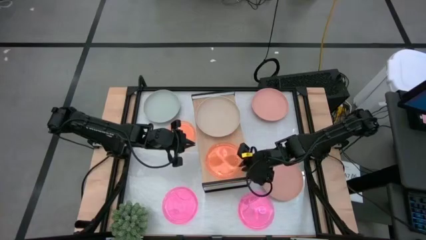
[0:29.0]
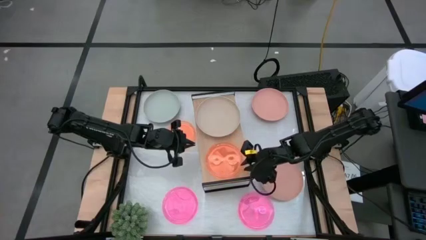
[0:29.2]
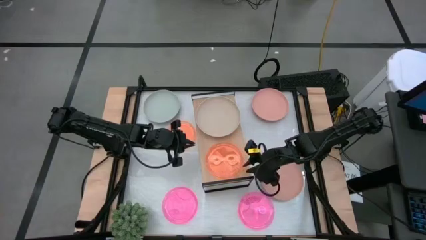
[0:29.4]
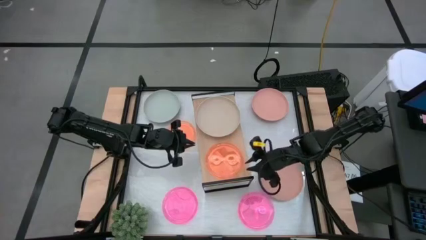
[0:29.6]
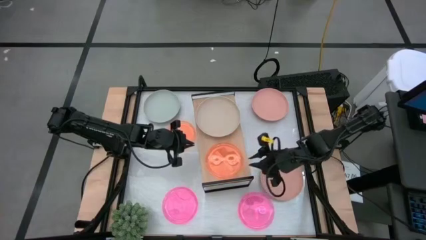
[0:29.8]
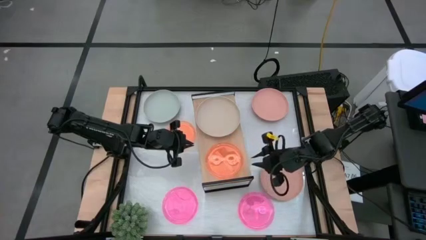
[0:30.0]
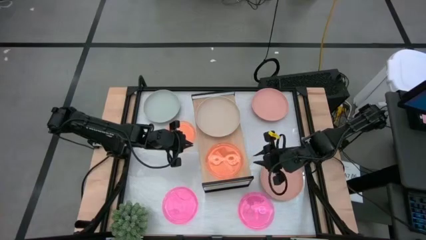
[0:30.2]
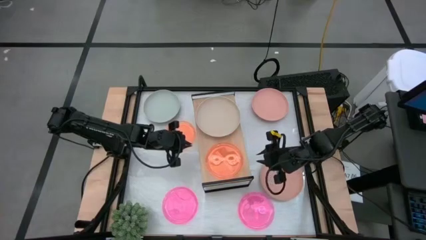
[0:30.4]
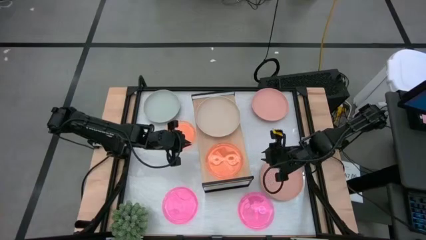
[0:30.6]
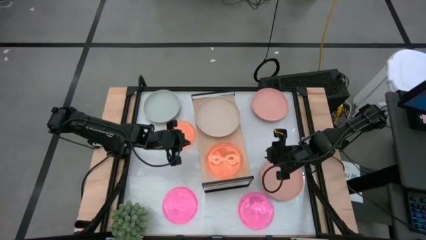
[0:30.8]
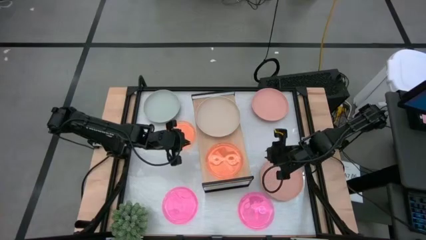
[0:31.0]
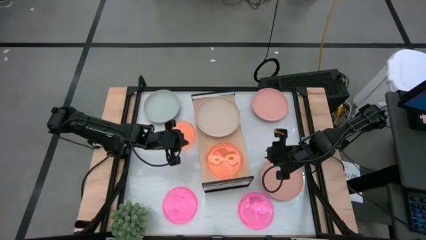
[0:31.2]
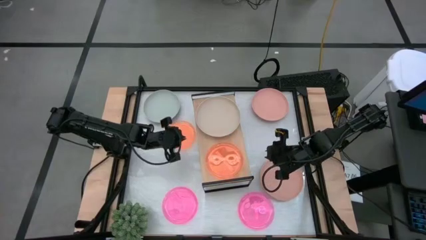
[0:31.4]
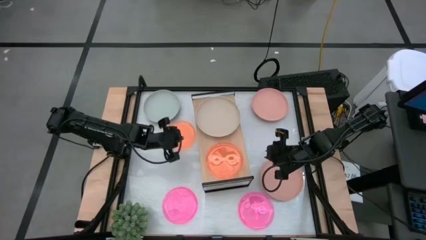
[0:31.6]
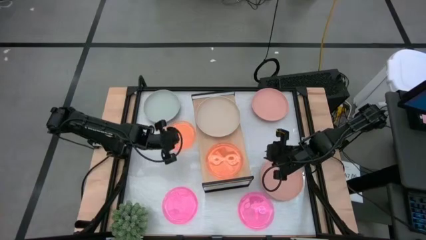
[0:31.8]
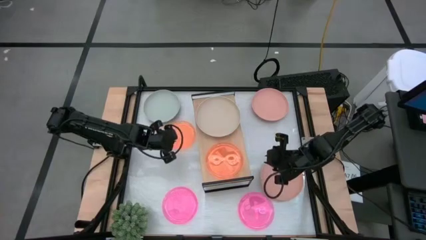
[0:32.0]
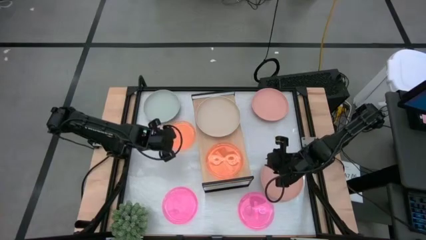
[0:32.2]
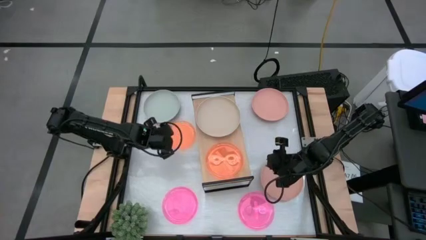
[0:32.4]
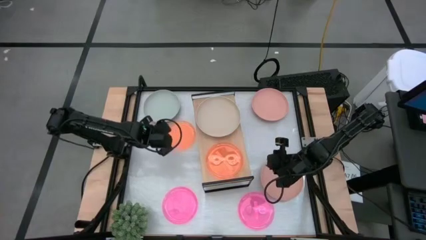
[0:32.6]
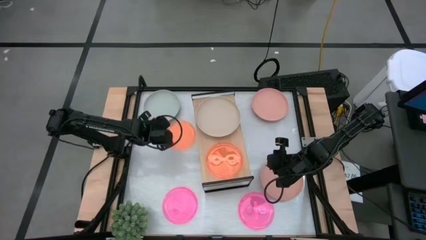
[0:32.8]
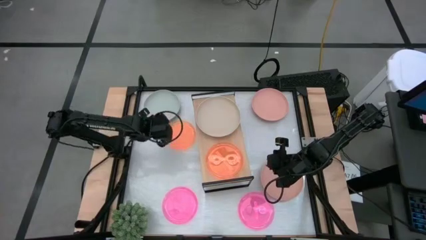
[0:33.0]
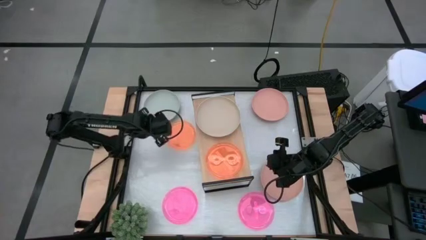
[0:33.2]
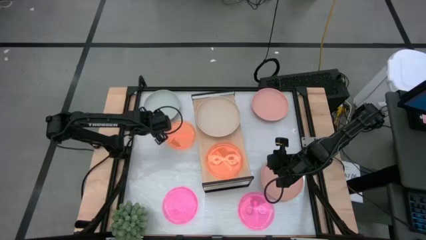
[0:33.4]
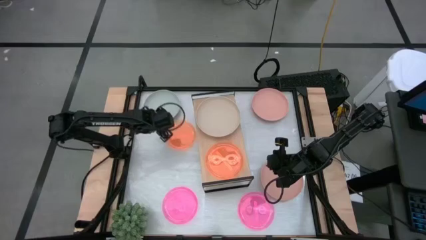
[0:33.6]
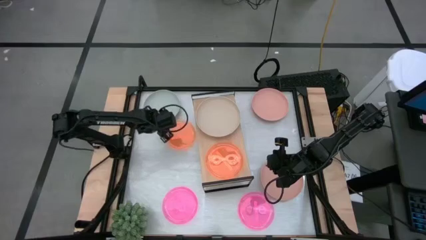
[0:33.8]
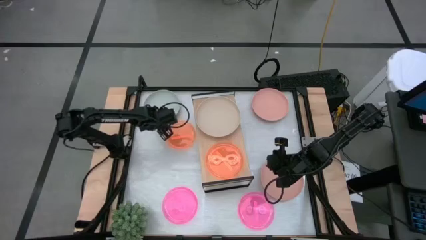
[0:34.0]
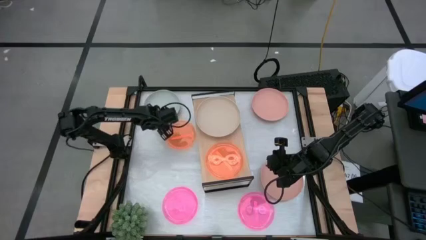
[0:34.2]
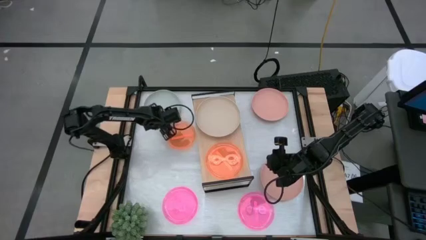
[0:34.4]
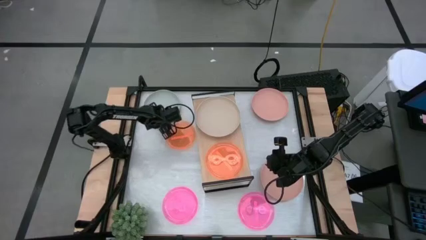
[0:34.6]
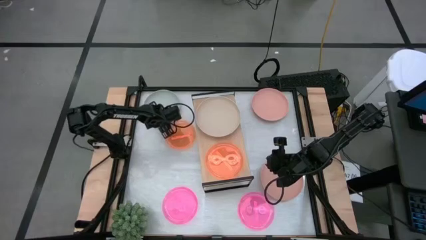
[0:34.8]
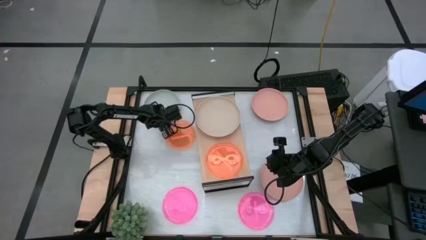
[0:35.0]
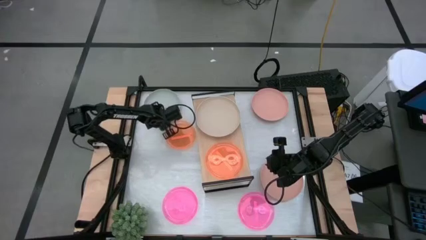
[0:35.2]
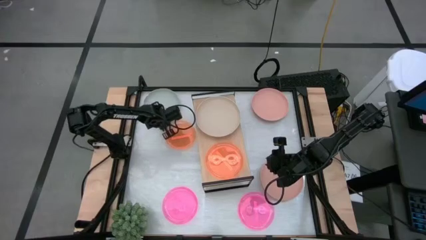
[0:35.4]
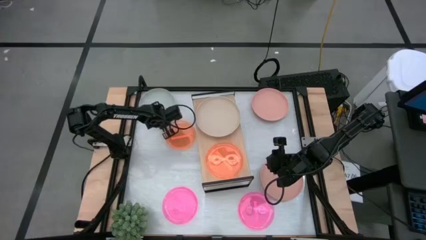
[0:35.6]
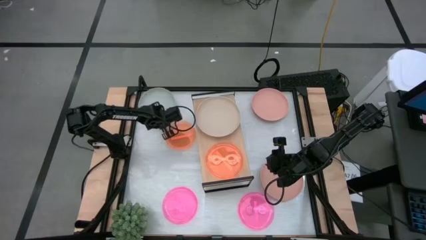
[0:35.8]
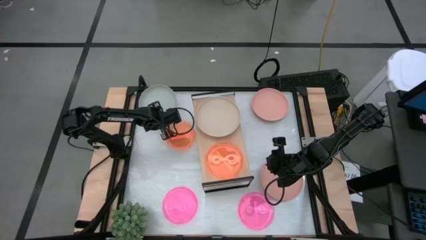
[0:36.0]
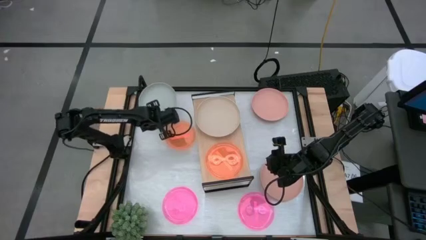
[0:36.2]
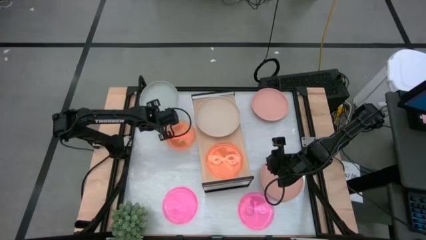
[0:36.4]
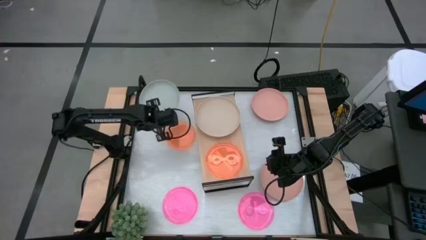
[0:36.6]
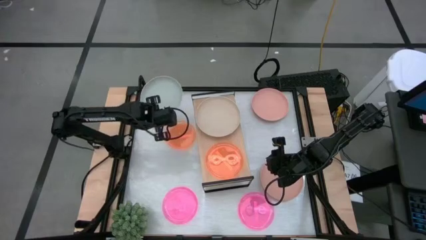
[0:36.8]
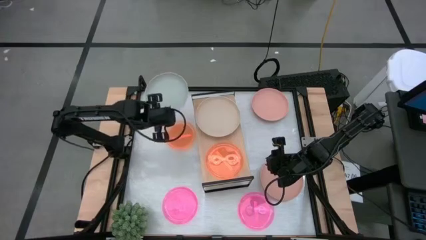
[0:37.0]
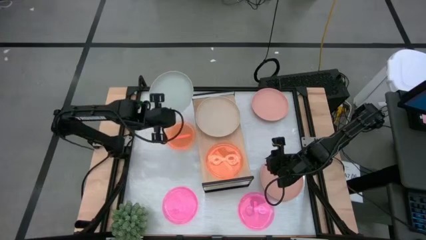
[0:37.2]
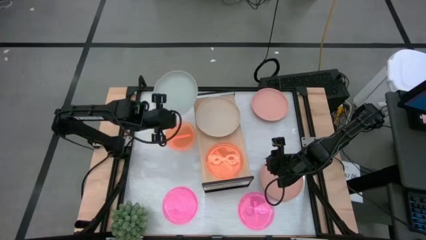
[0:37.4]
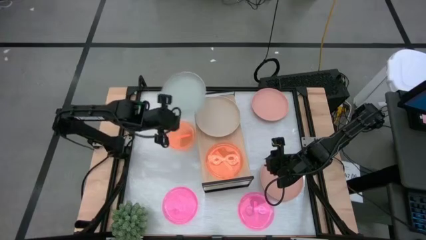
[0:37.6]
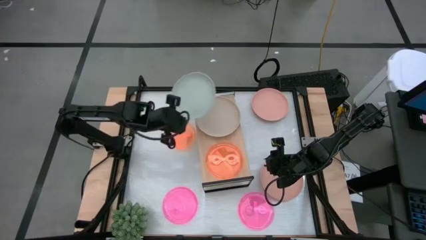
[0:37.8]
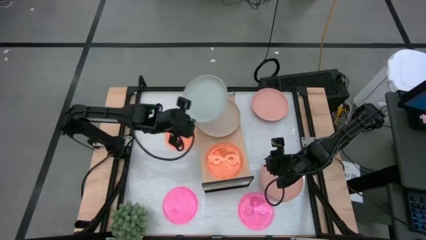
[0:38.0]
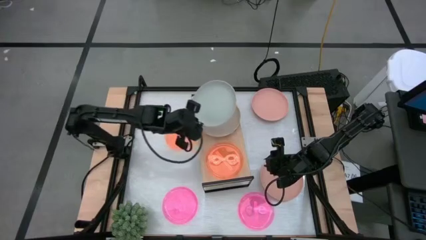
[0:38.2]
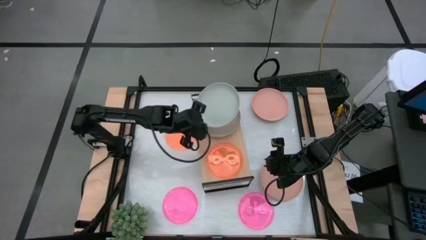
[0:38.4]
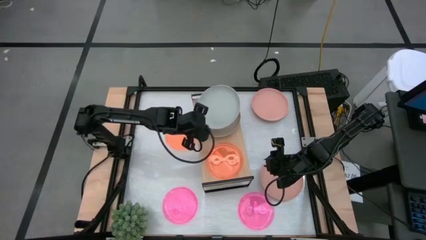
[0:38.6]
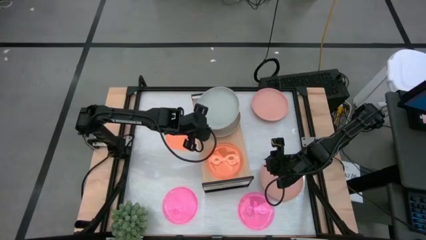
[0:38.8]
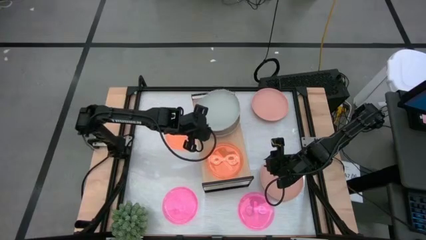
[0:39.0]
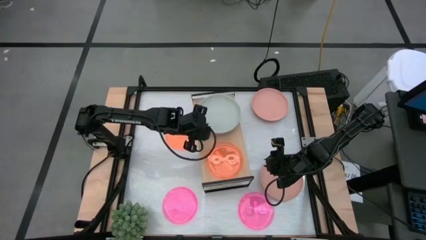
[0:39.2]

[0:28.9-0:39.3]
Task: Place and stack plates onto a shelf
Stack the gray plate on the brown plate on the shelf

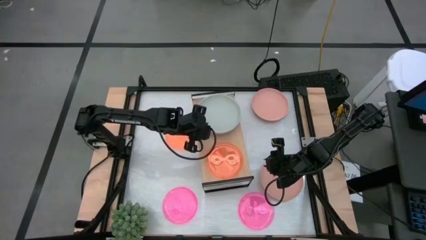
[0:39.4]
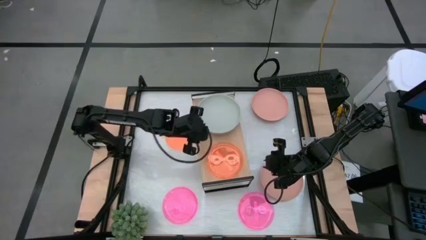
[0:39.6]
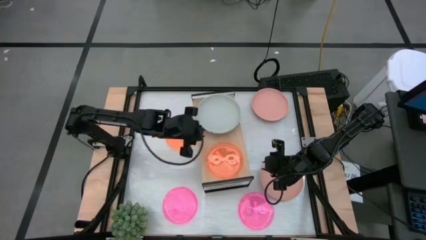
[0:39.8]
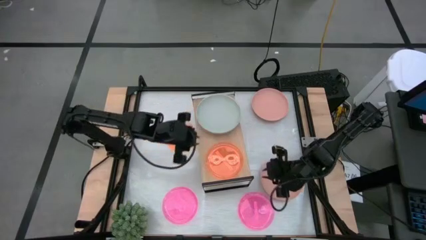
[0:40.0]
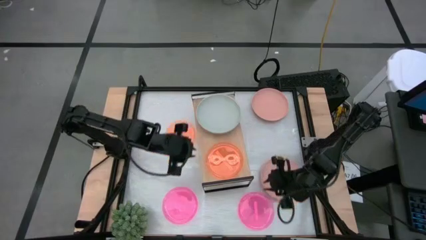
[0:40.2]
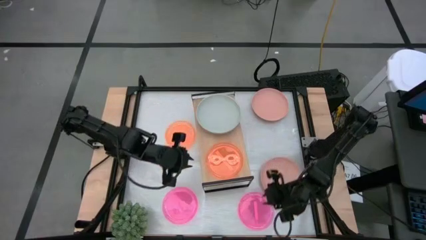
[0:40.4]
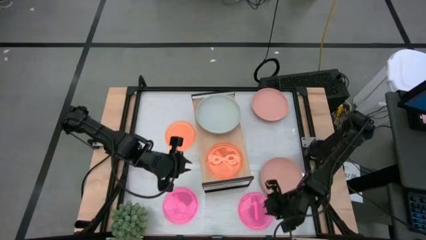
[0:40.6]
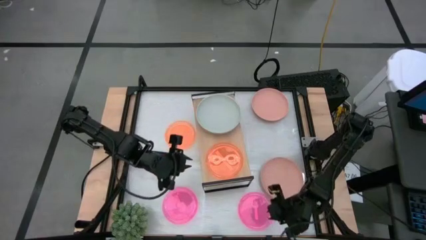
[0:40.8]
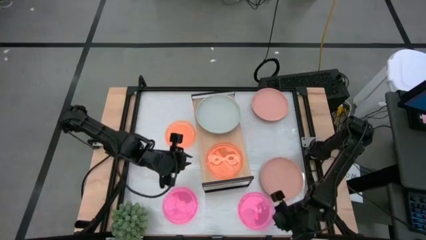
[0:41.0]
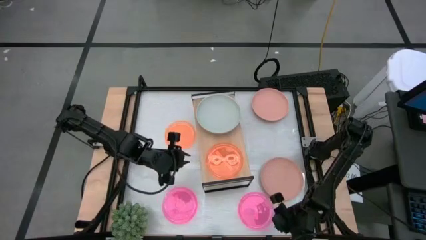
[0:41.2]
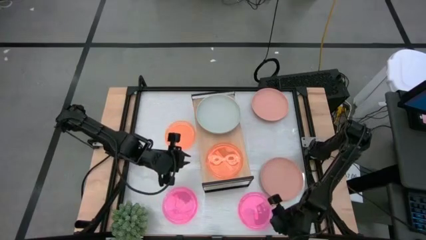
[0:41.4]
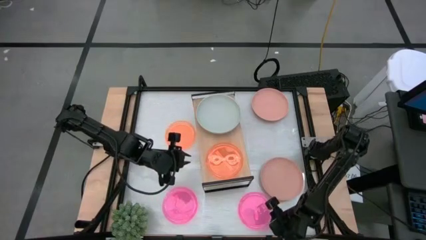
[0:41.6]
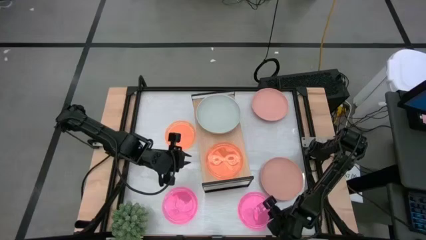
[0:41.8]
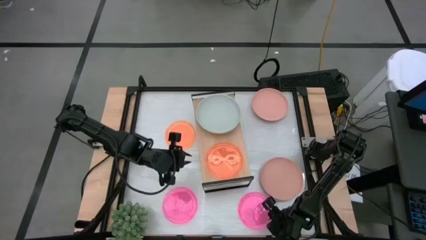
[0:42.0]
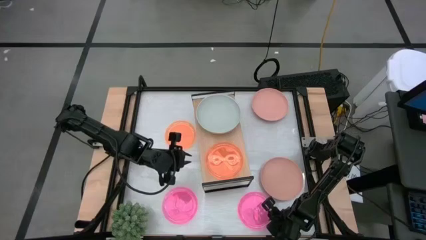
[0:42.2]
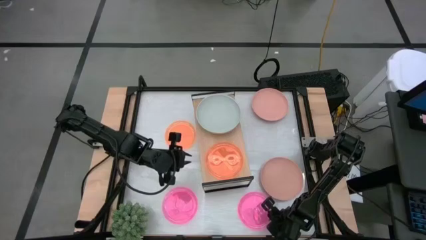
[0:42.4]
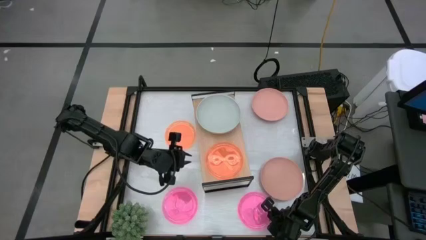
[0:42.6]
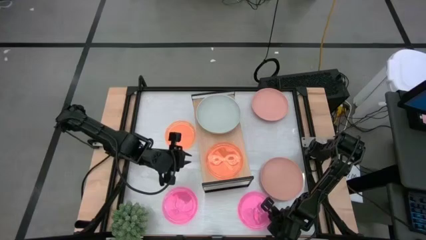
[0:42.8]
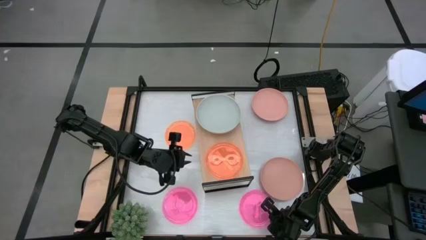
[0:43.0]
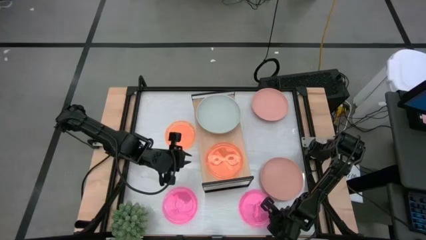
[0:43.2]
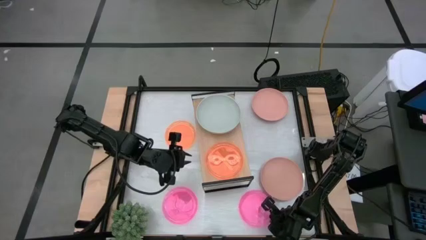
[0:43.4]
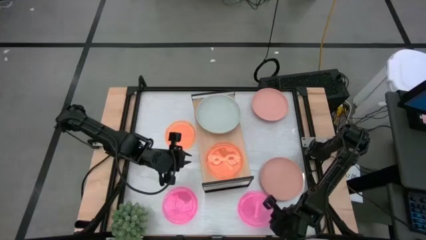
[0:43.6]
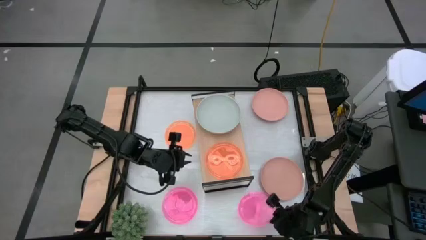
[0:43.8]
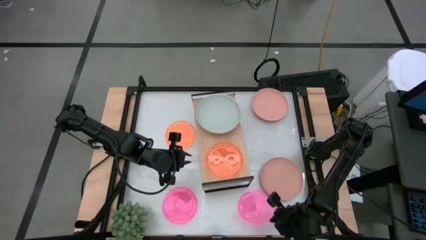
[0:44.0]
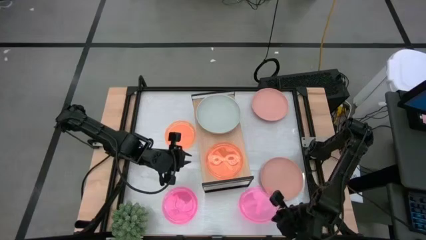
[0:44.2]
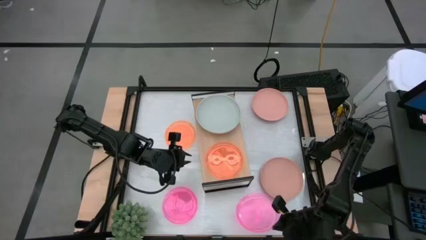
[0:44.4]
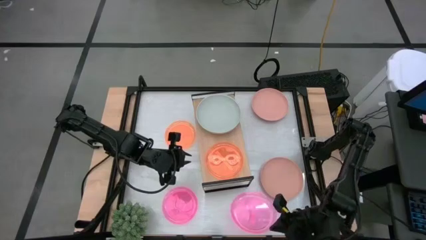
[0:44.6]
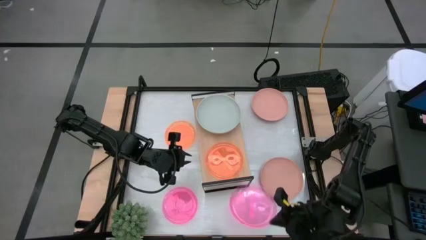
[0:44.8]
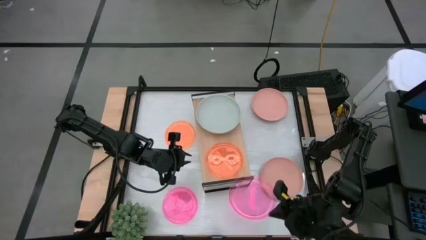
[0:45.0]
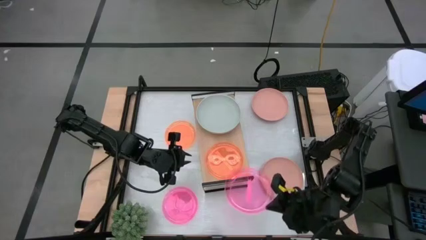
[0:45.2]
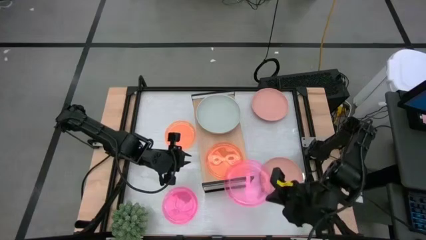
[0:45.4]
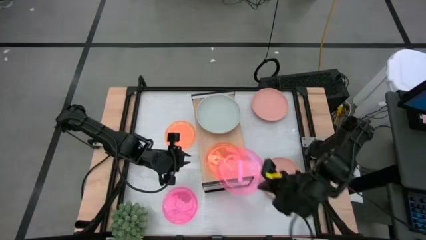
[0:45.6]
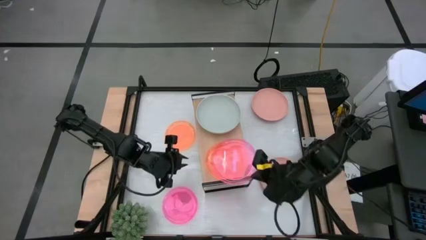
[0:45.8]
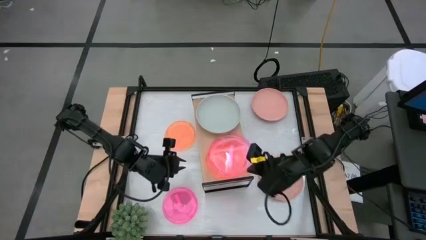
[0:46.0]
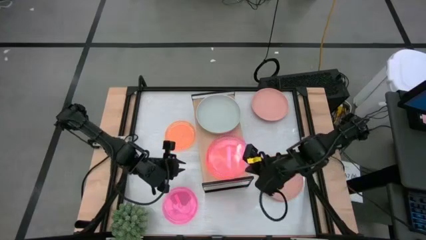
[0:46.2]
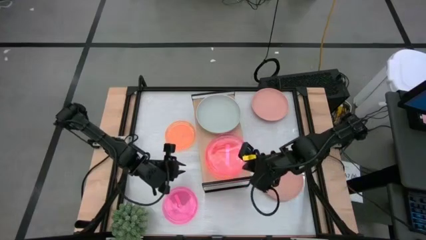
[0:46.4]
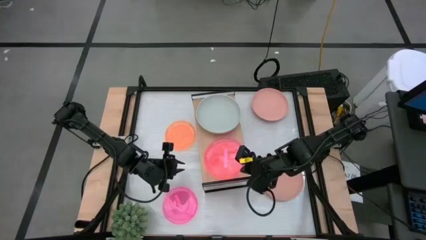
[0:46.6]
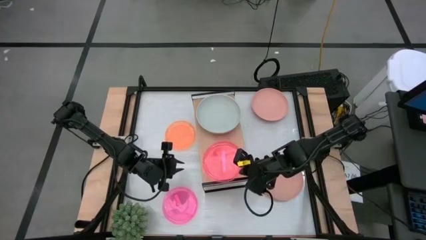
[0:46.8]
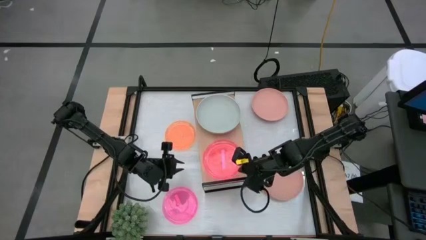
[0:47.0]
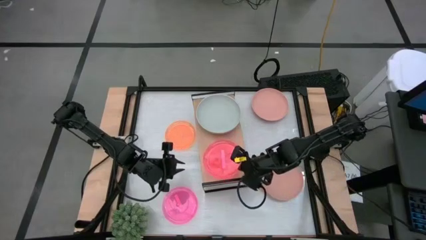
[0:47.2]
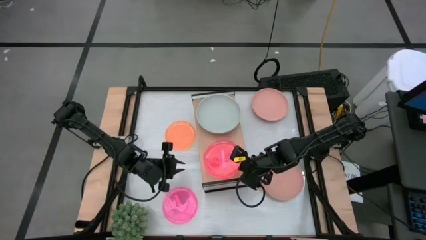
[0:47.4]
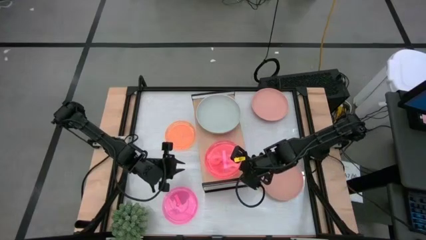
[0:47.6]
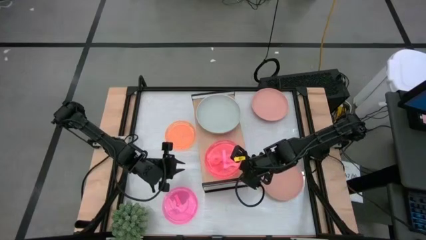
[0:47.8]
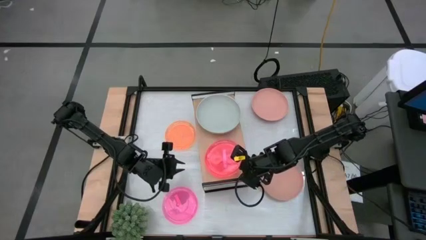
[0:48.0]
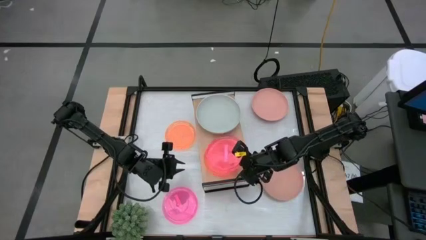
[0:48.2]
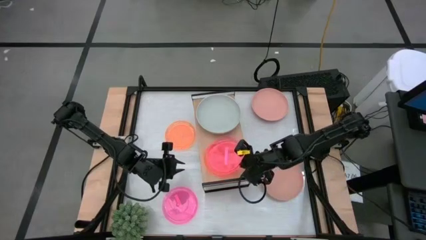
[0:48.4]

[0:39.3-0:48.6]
Stack the right pink plate on the orange plate on the shelf
